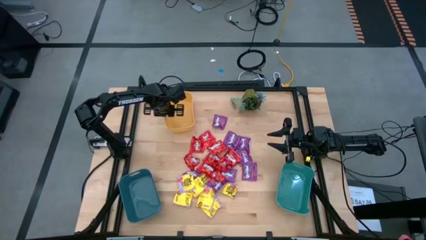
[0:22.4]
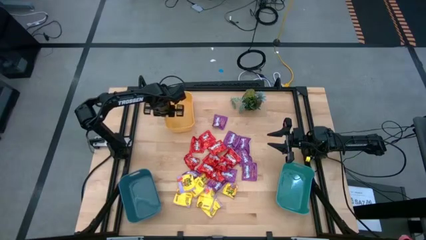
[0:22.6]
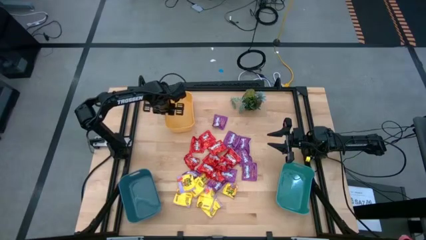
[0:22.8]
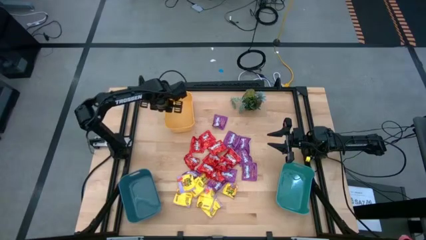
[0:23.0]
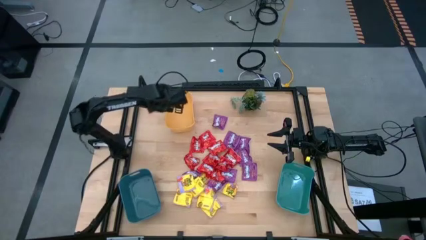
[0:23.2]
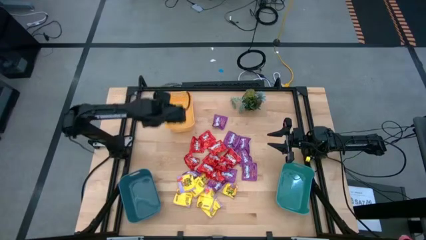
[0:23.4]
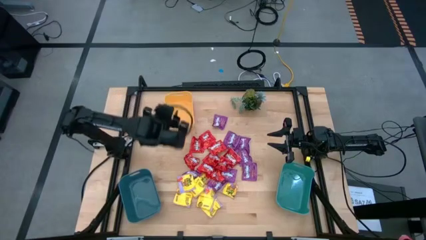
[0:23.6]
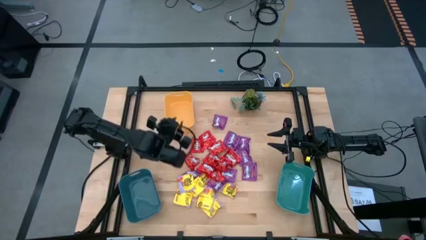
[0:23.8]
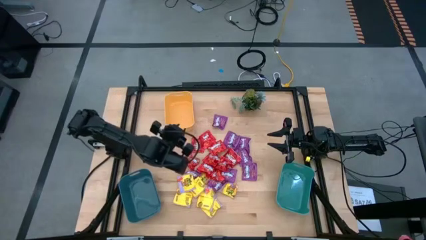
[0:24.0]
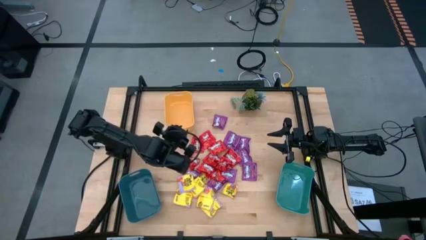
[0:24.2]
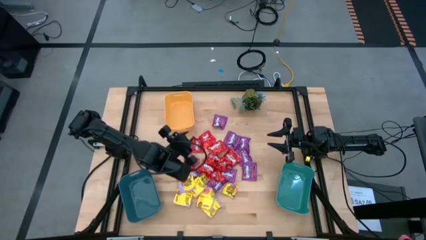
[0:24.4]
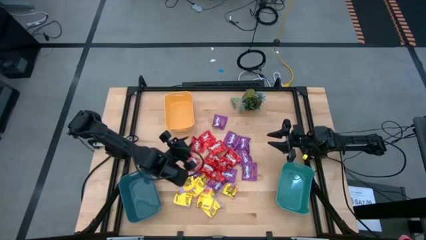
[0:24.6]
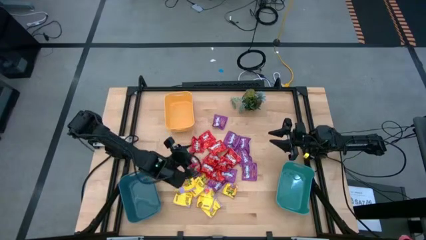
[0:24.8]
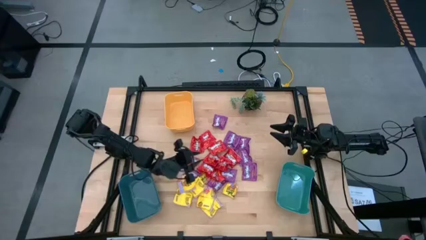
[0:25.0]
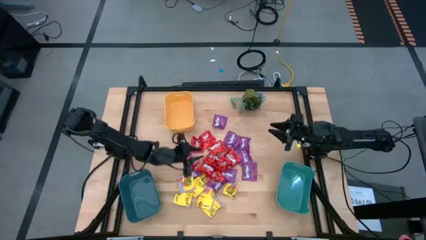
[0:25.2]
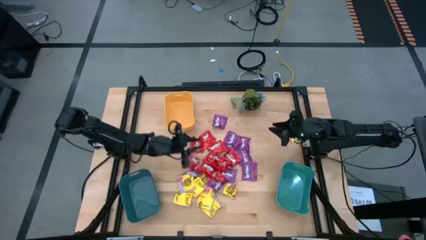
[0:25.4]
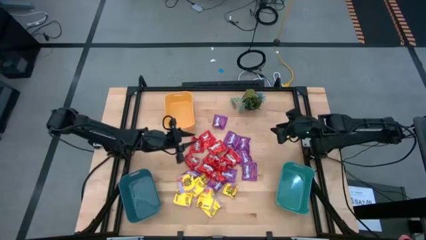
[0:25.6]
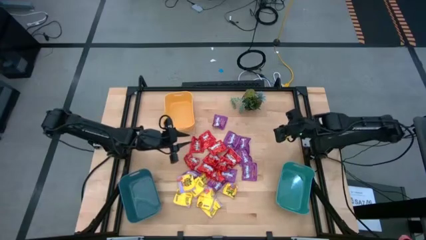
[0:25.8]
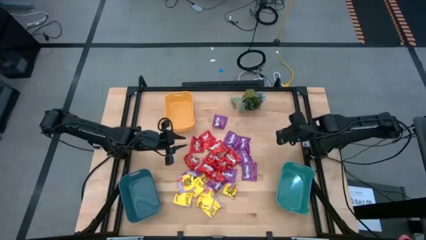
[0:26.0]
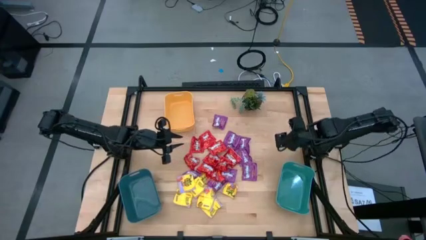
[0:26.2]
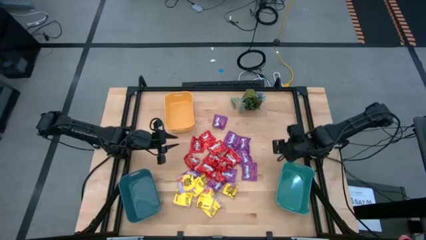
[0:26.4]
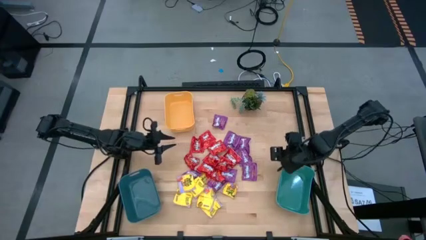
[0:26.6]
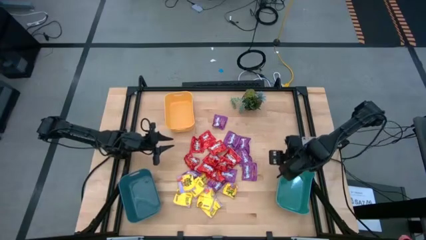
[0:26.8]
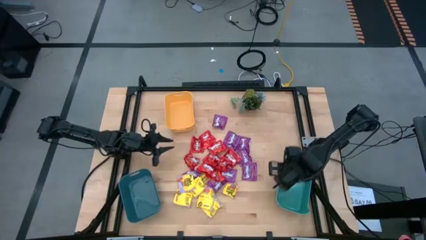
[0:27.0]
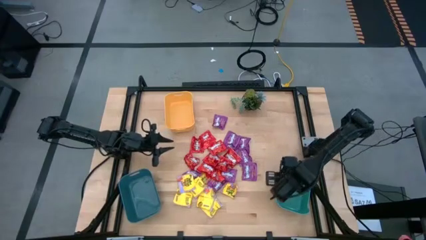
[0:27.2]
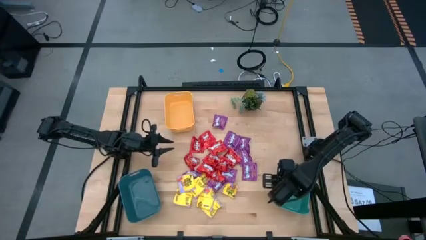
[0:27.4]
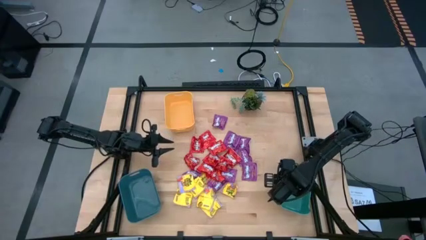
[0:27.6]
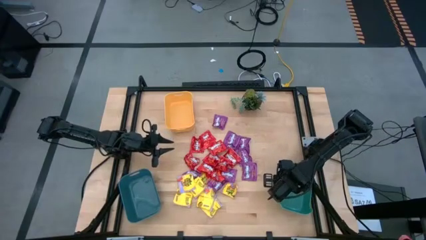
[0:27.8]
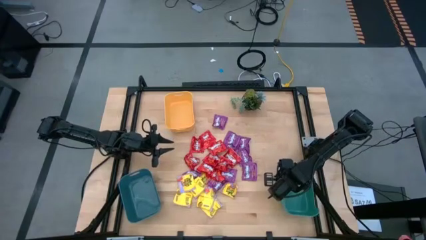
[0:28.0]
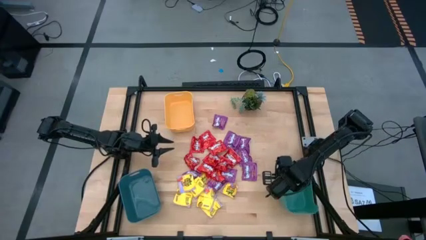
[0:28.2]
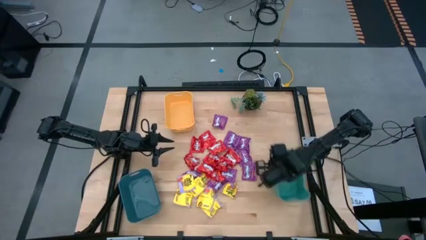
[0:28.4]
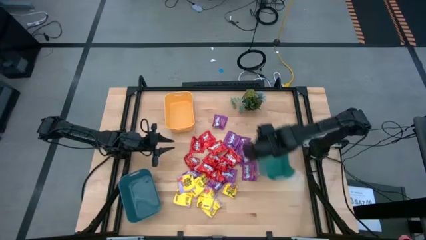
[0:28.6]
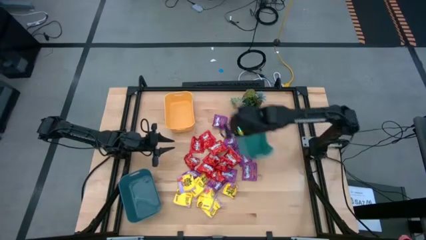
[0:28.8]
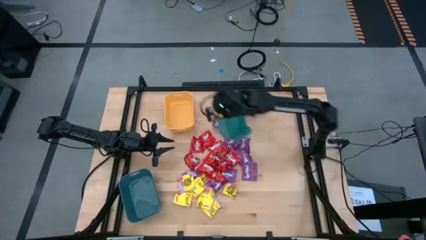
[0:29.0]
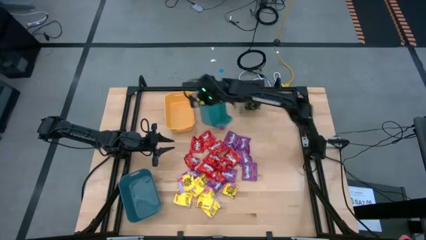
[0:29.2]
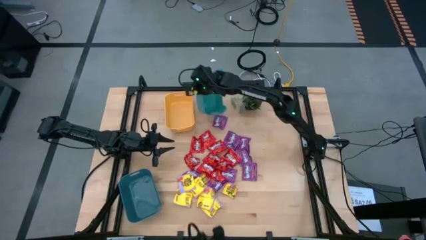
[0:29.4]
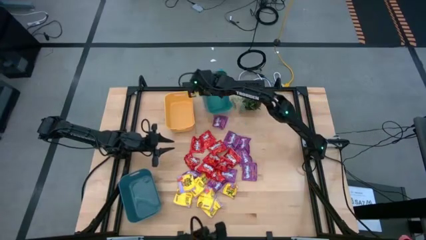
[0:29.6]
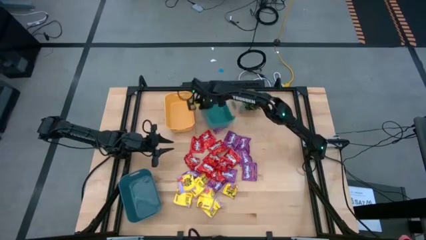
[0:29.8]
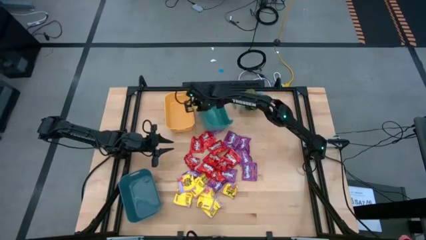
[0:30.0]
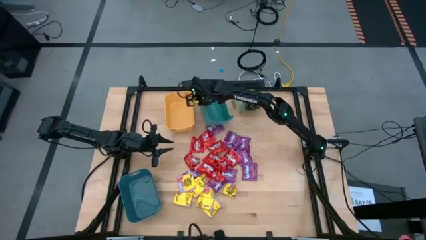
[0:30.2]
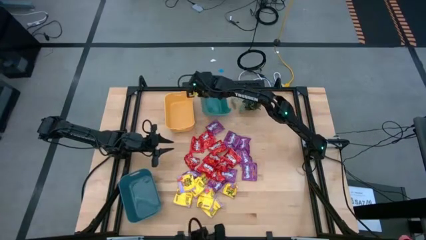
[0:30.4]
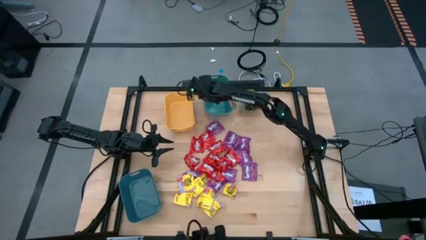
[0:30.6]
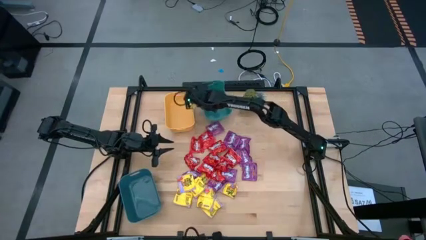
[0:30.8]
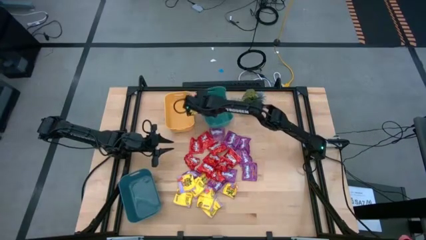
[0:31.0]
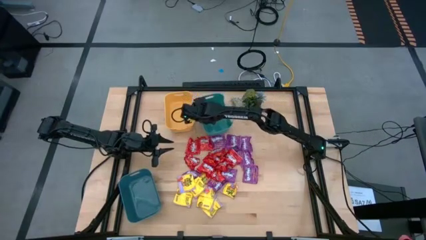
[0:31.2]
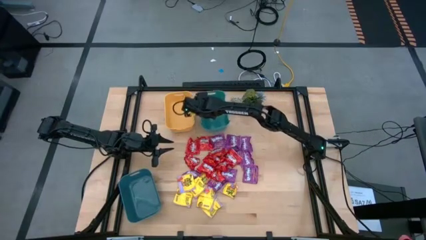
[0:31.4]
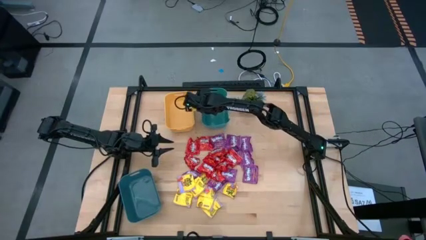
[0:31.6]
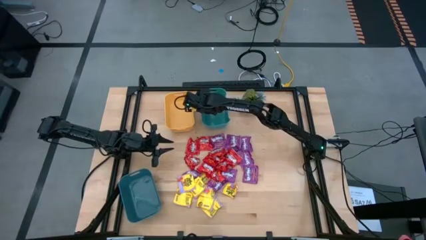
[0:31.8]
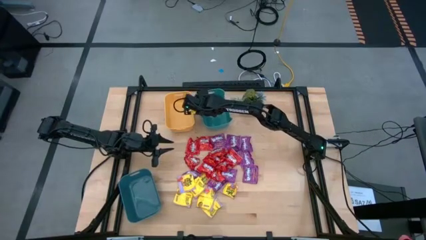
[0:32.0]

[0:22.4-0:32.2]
Task: Sort candy
Move the green bin to the top center of the table
